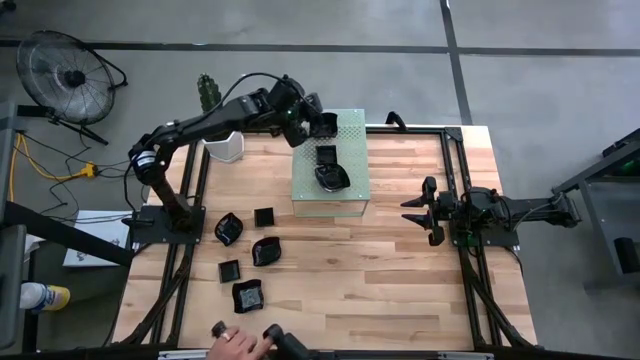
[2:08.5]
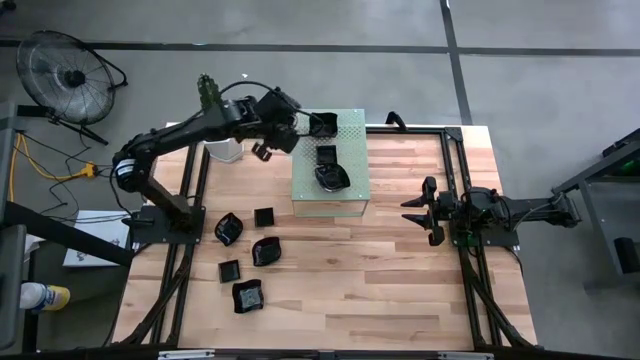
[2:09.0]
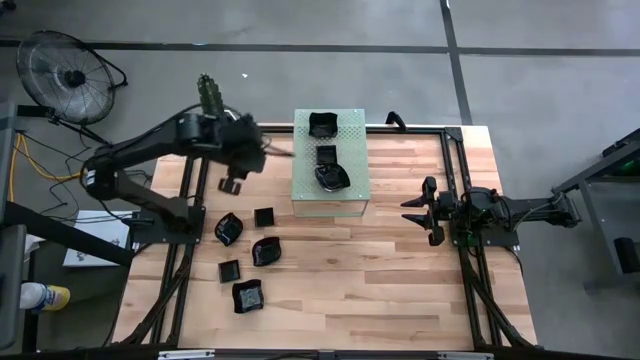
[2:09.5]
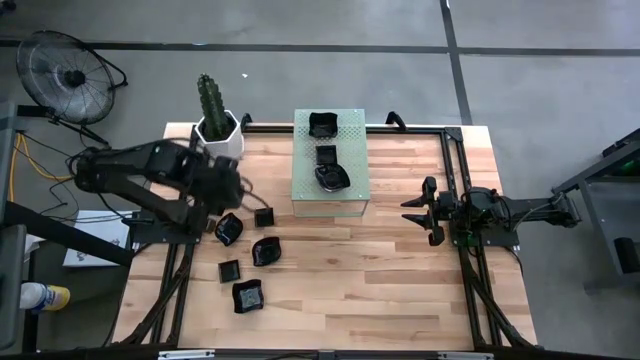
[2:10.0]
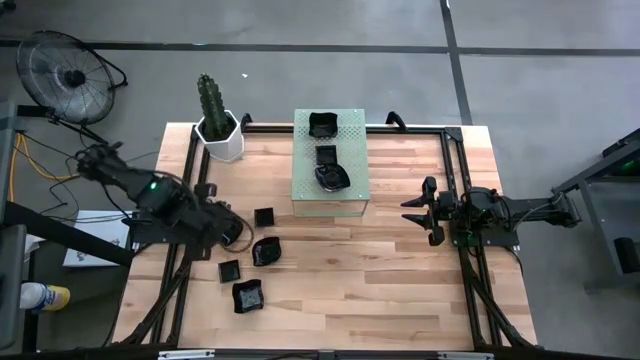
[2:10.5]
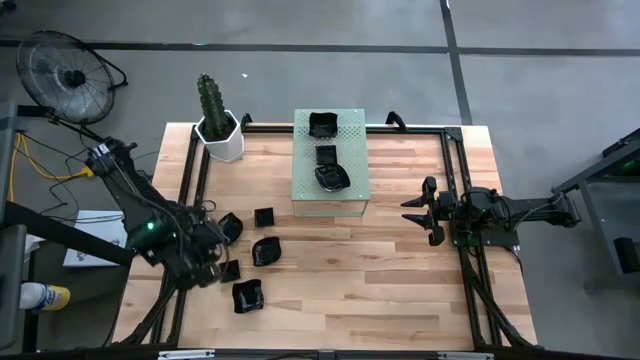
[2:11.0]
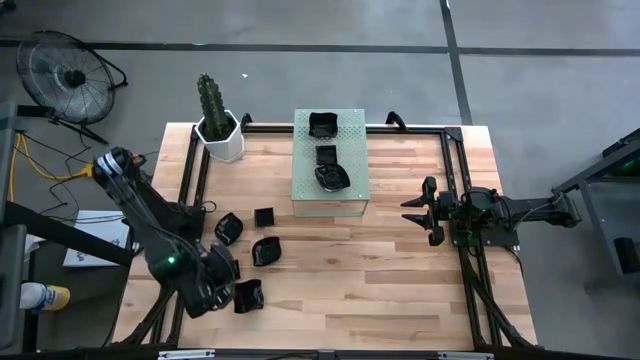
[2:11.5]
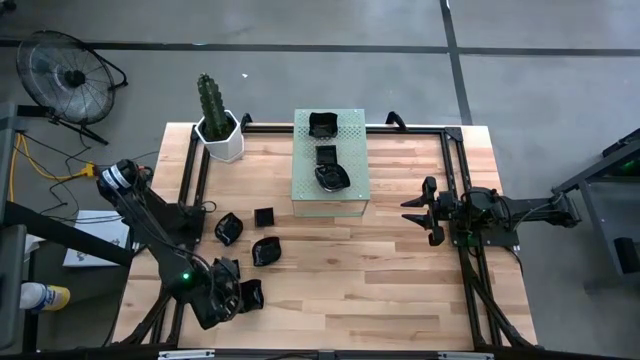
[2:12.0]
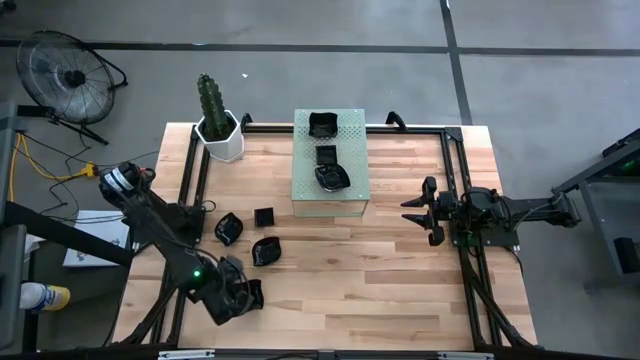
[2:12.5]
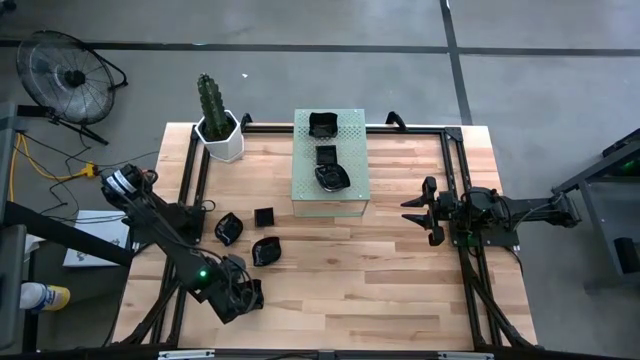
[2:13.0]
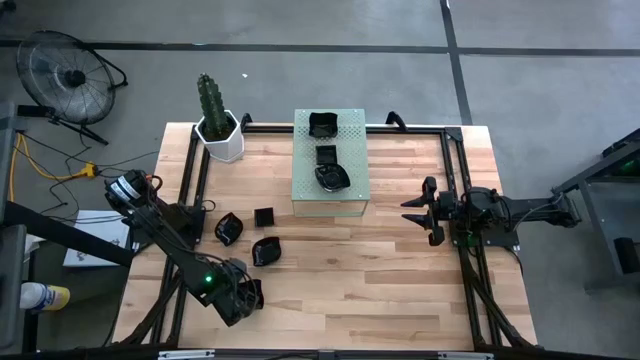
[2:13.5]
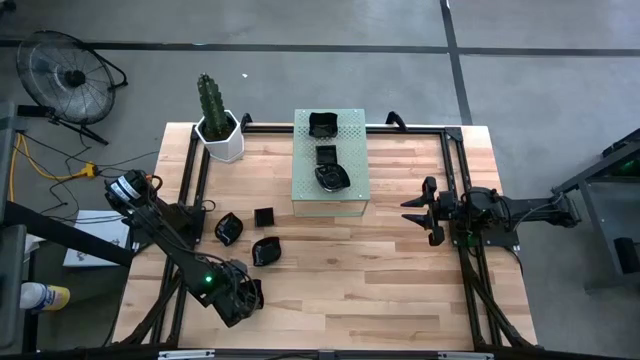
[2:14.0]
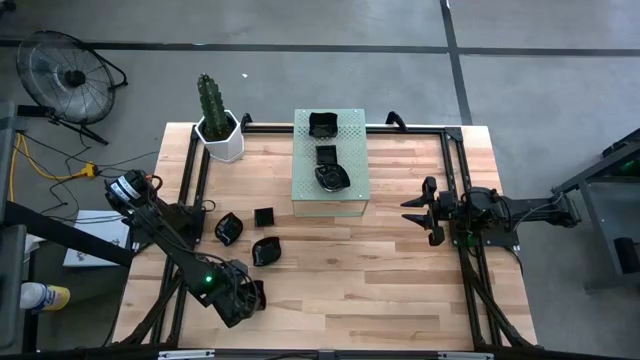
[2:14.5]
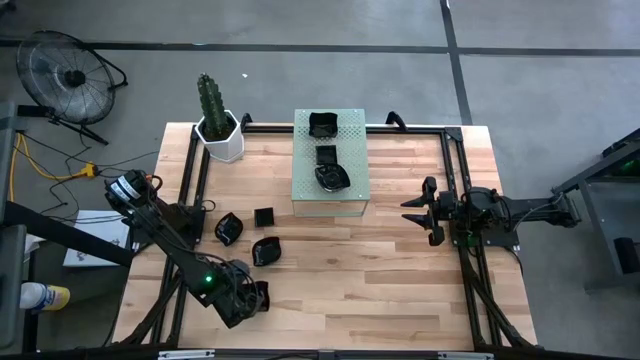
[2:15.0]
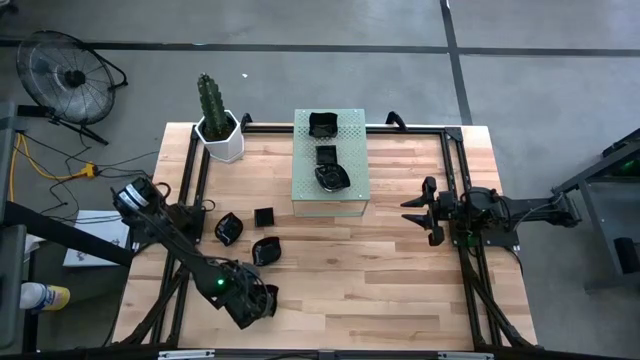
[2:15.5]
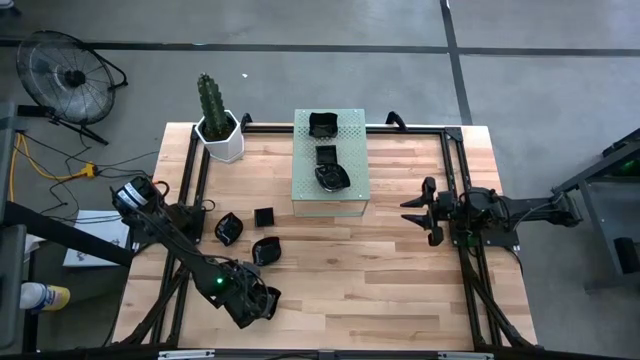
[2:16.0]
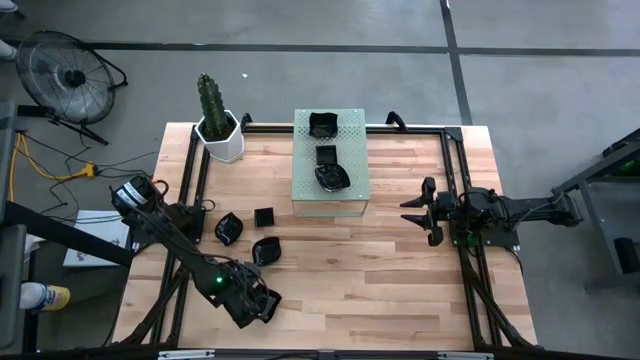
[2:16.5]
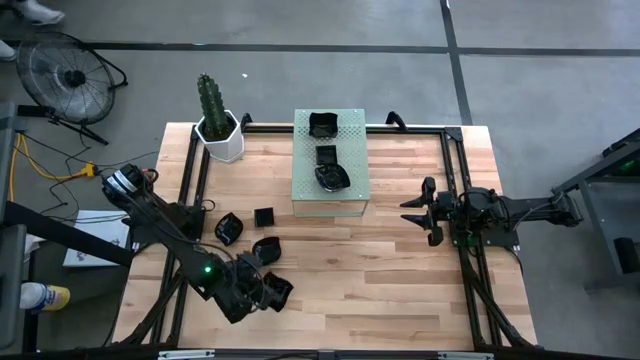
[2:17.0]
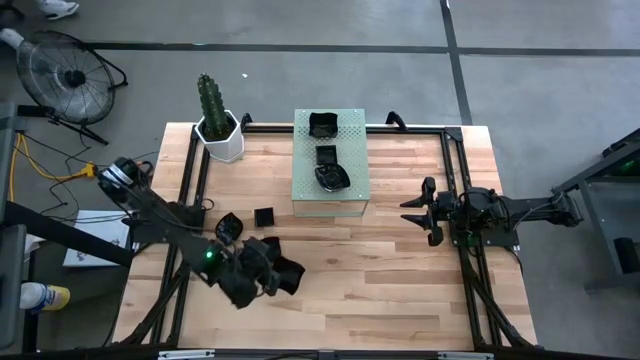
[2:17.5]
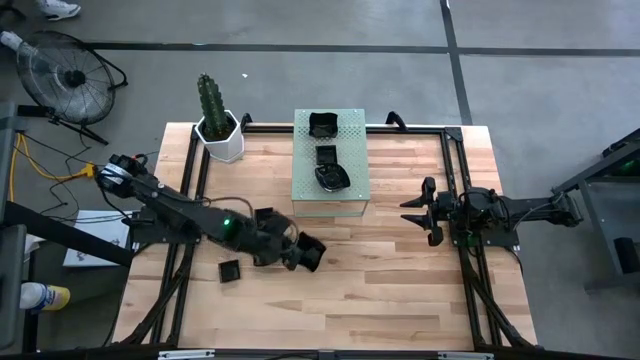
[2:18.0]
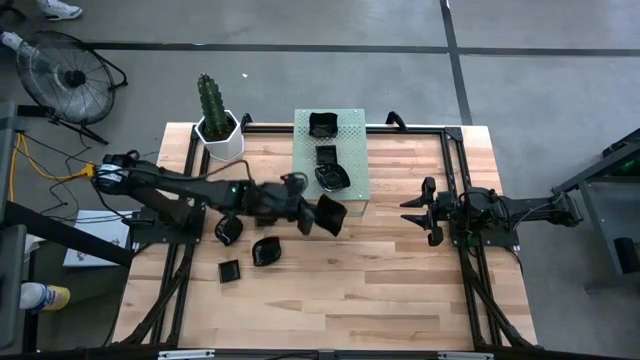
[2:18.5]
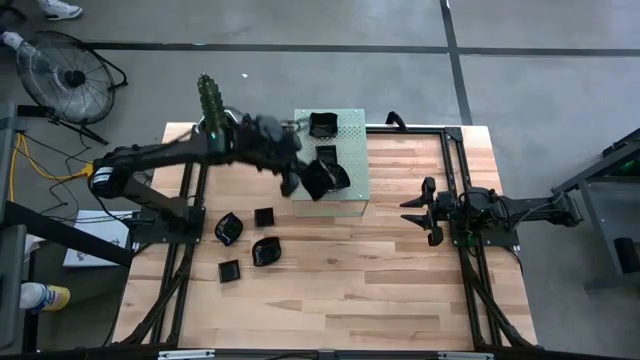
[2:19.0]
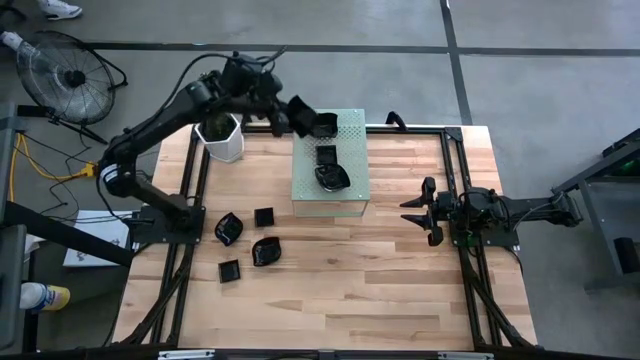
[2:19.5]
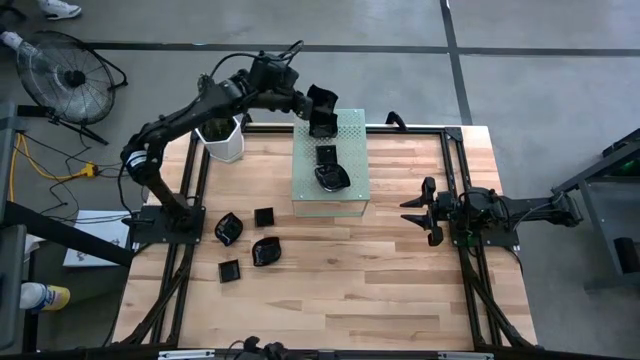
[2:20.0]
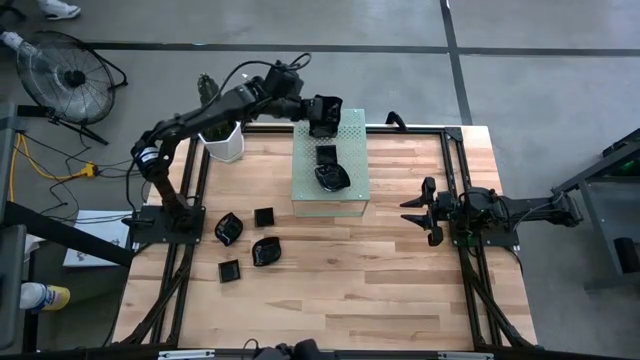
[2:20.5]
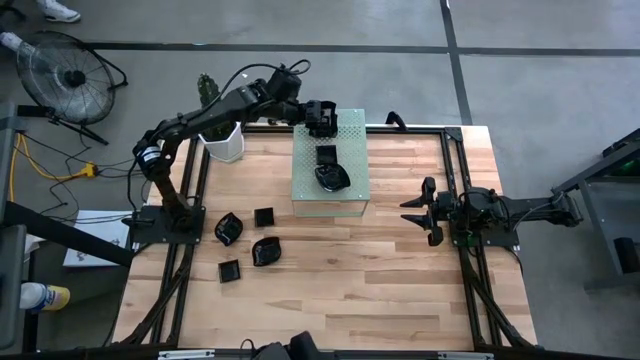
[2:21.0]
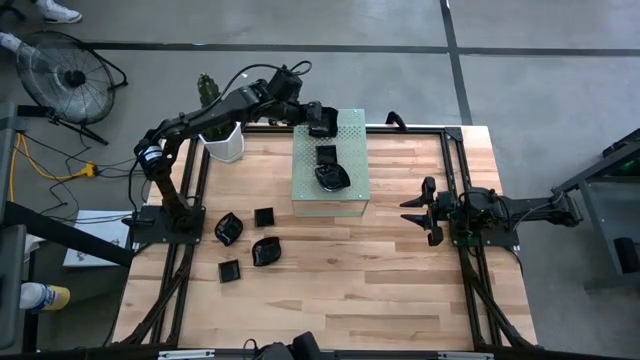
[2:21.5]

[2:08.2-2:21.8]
Task: Pick & Place Mini shaped plates
Stack the black distorted square plate on top of the black distorted square plate on the shelf

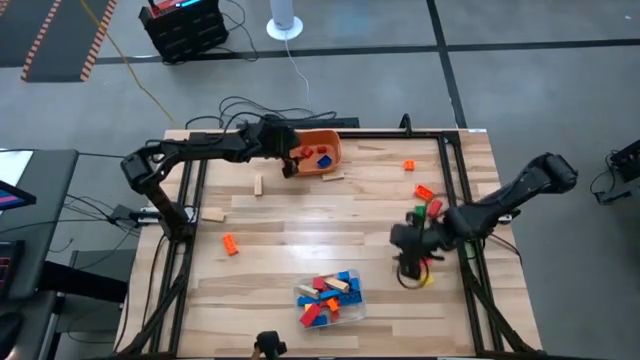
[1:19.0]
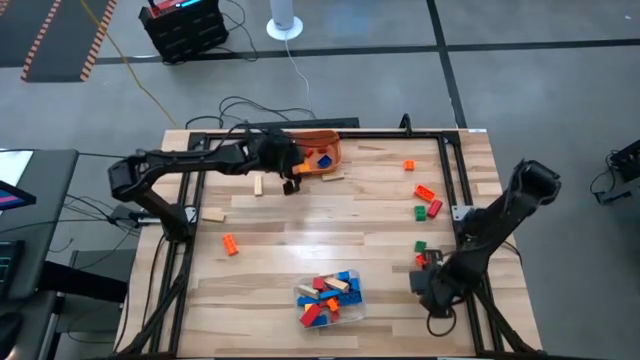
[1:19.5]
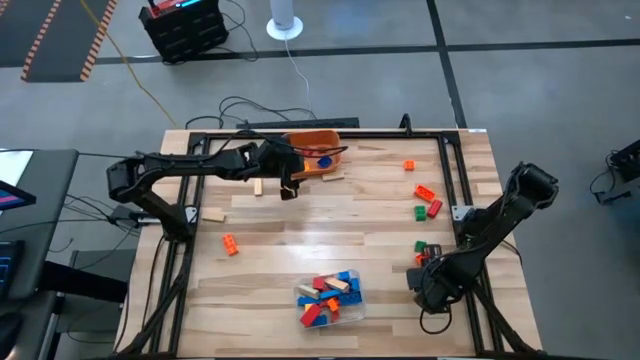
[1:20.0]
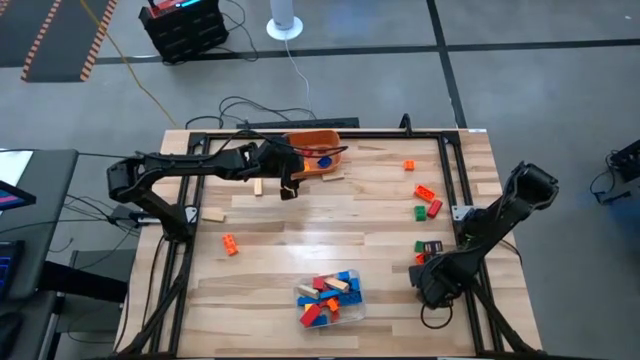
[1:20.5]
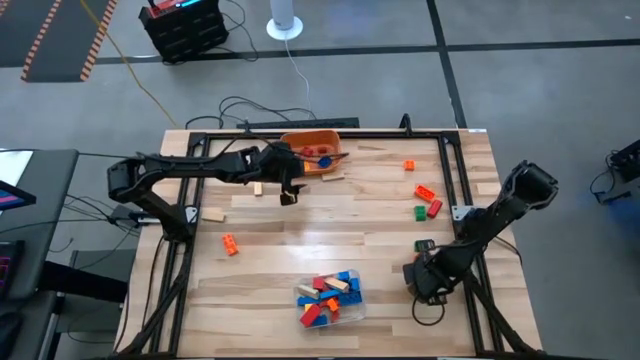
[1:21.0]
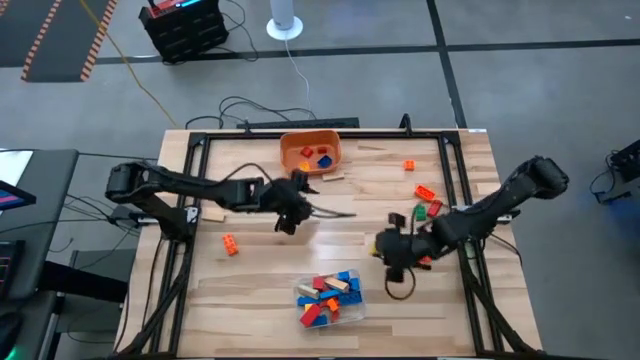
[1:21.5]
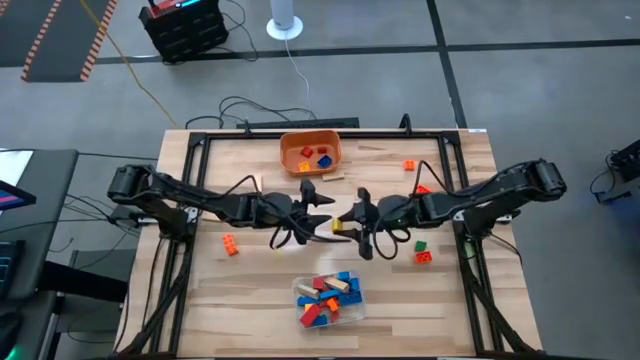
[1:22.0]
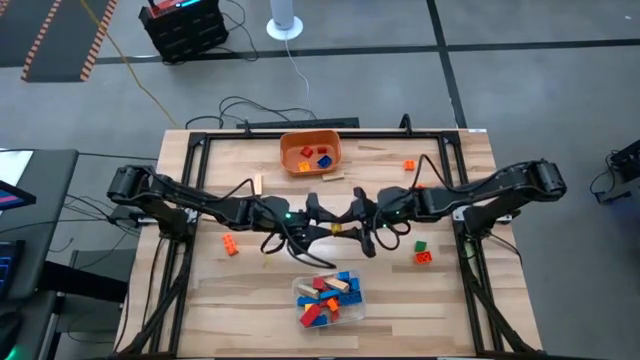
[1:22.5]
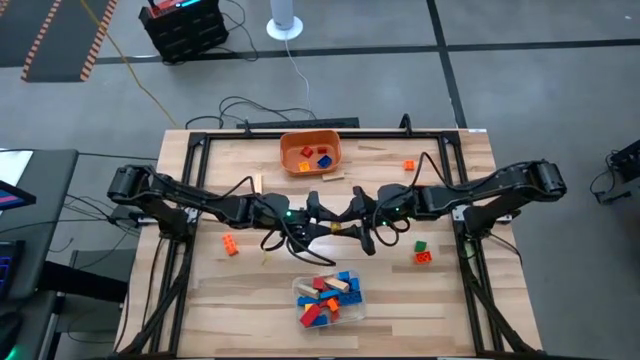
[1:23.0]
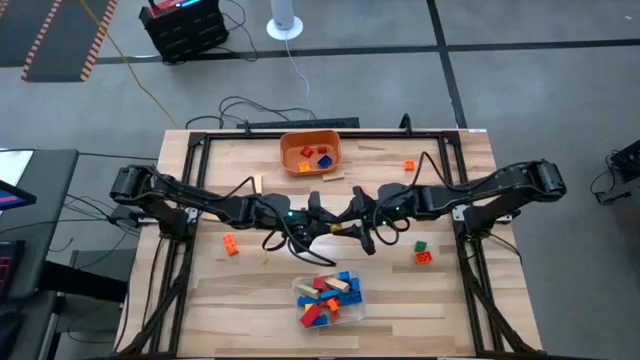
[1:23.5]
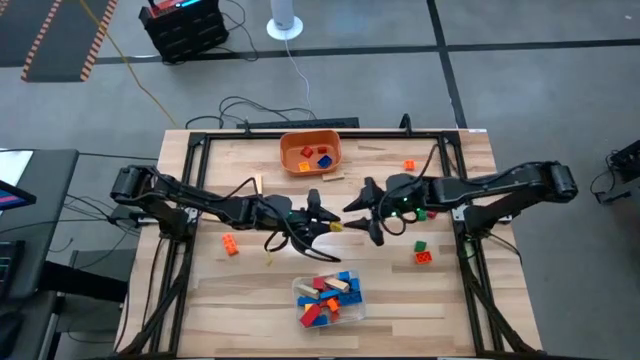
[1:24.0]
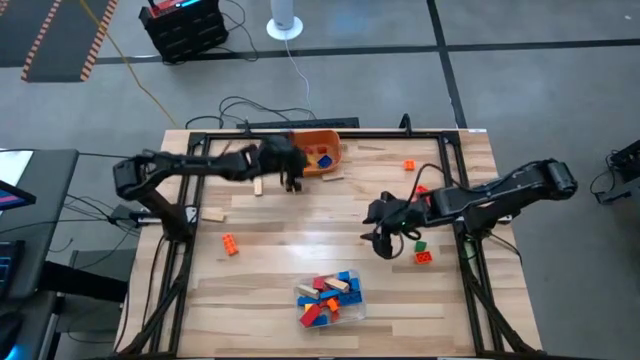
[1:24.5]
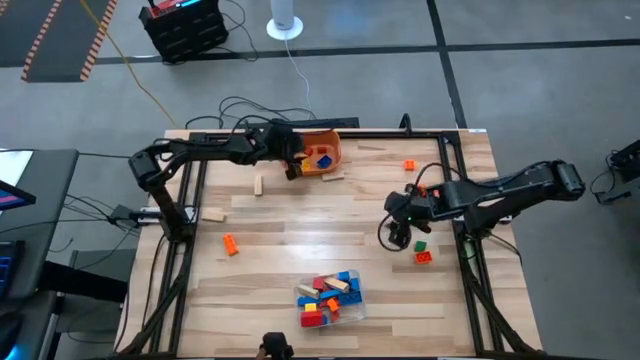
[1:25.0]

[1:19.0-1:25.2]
Task: Sort blocks by size
Put the small yellow wooden block into the orange bin

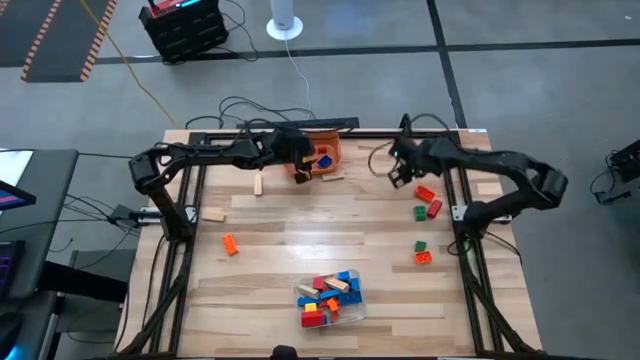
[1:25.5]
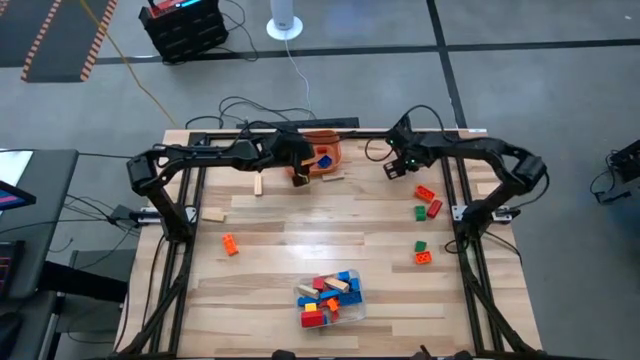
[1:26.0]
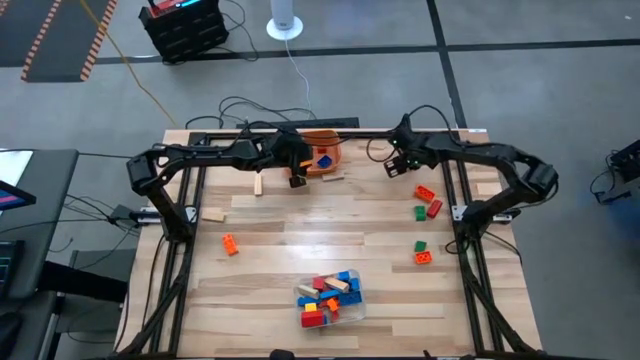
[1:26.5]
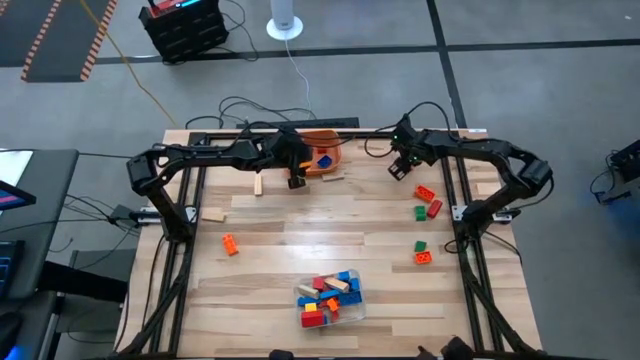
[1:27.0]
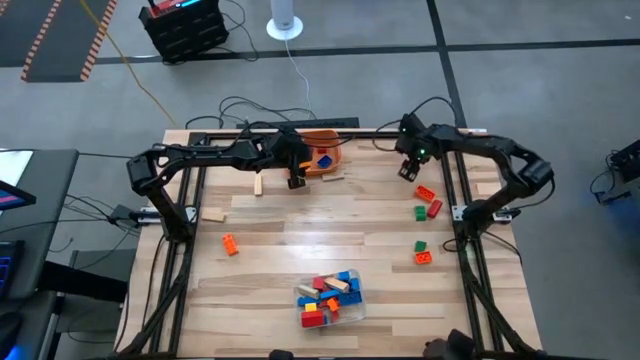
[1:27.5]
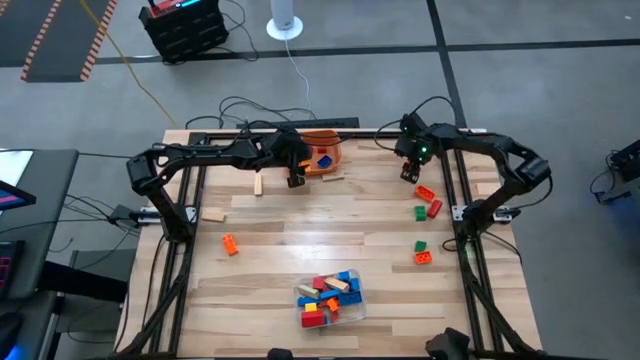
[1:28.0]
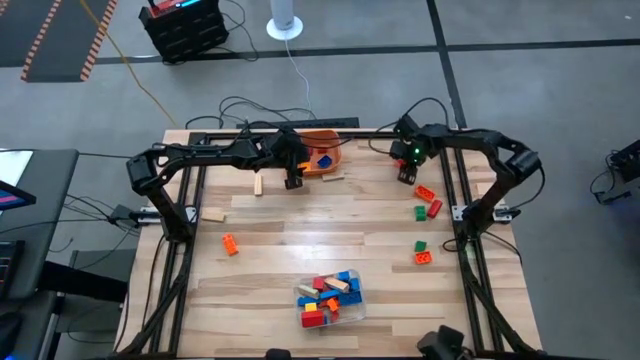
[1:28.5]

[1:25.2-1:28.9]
Put the small orange game piece into the orange bin
